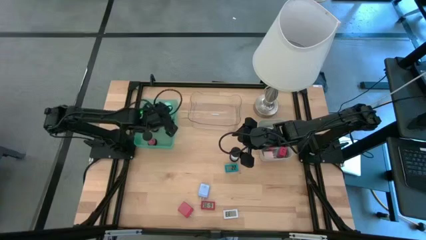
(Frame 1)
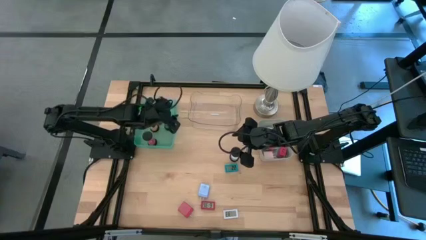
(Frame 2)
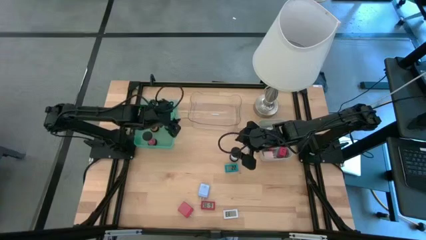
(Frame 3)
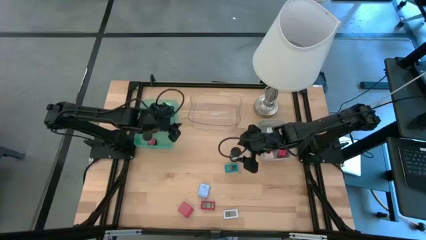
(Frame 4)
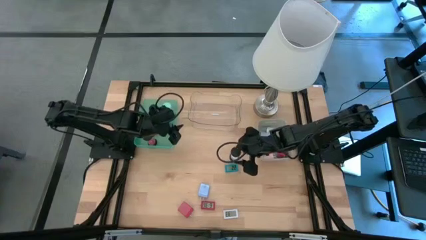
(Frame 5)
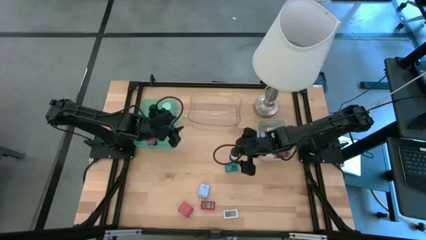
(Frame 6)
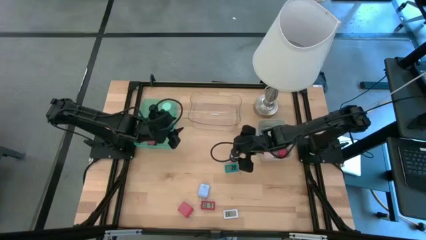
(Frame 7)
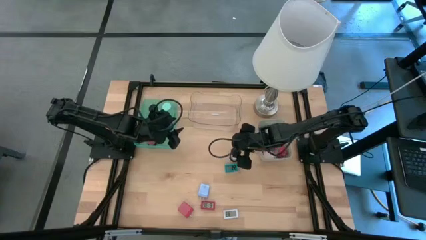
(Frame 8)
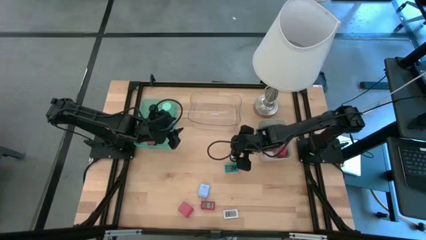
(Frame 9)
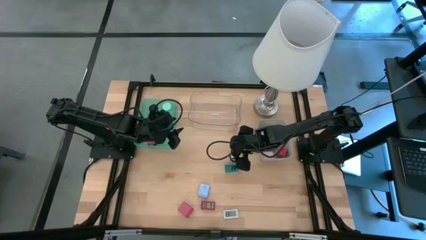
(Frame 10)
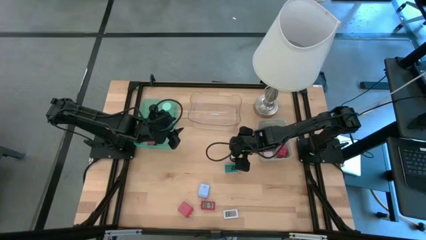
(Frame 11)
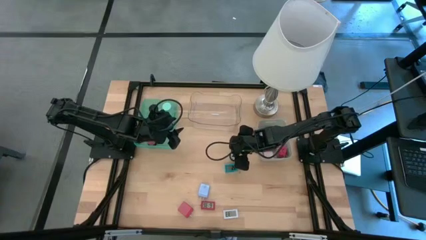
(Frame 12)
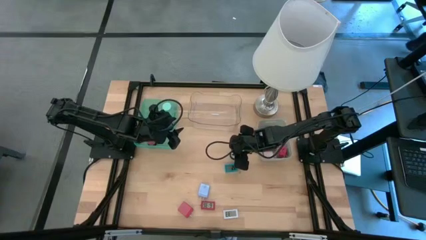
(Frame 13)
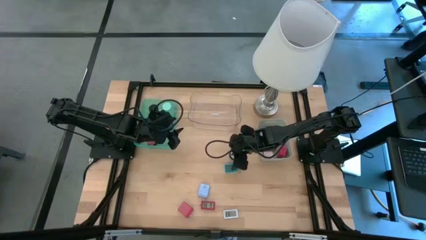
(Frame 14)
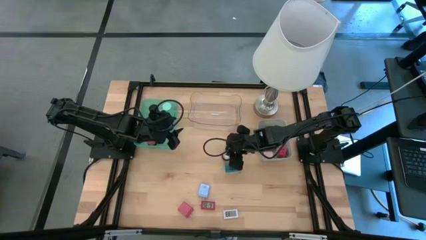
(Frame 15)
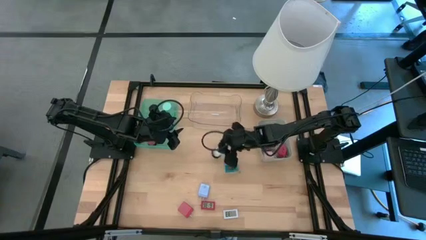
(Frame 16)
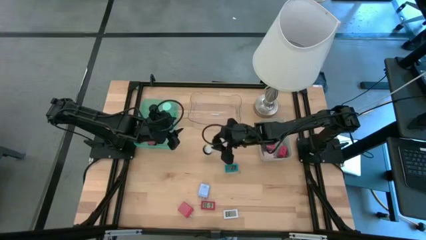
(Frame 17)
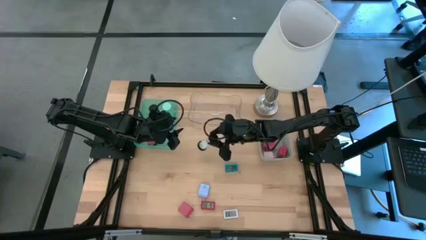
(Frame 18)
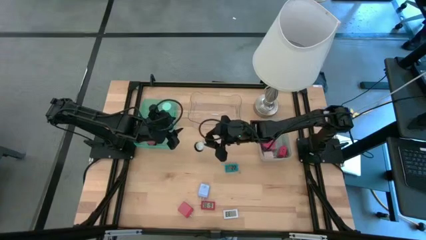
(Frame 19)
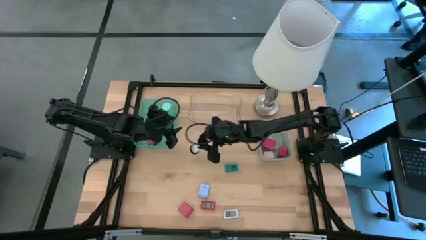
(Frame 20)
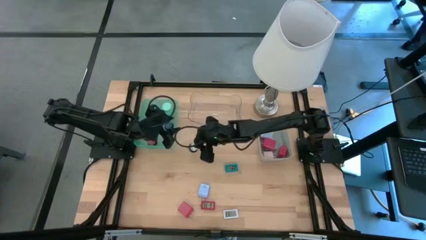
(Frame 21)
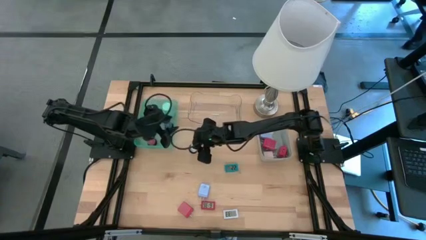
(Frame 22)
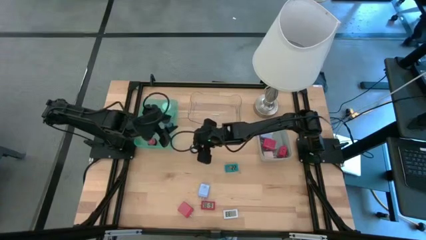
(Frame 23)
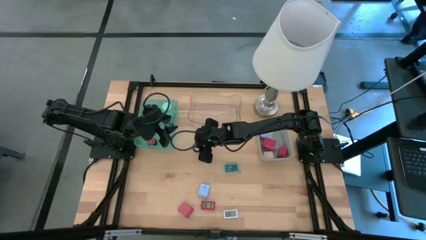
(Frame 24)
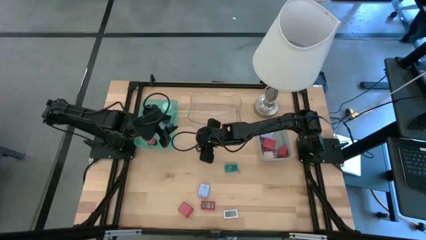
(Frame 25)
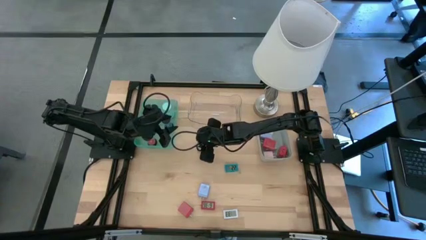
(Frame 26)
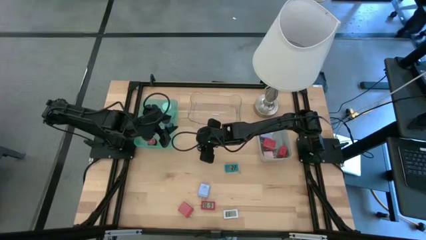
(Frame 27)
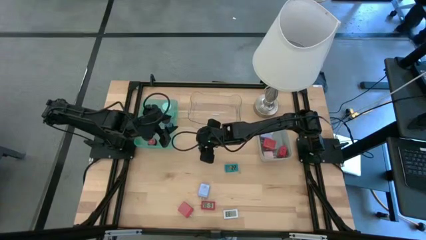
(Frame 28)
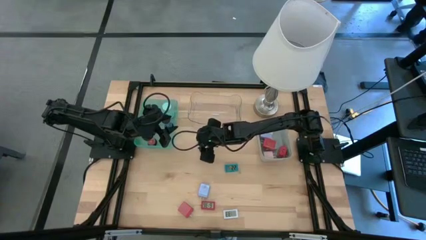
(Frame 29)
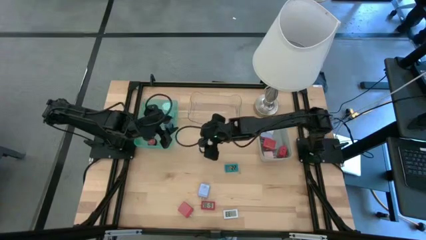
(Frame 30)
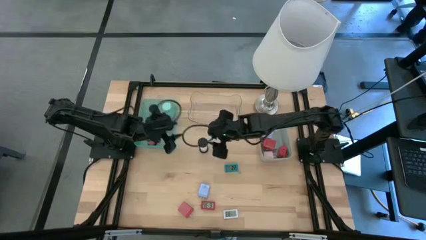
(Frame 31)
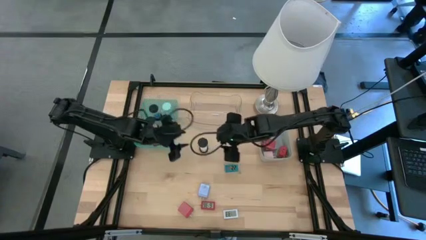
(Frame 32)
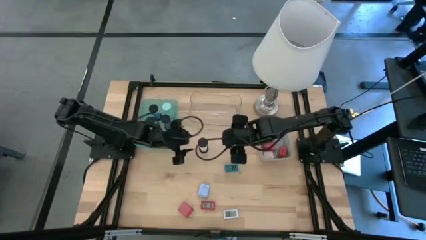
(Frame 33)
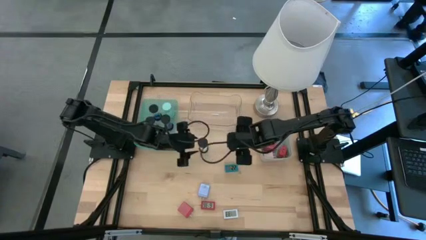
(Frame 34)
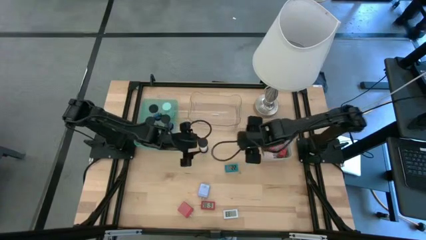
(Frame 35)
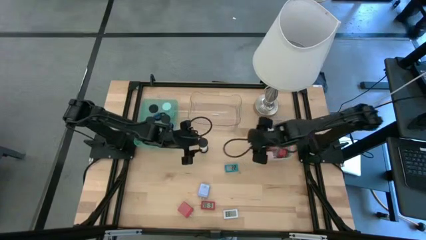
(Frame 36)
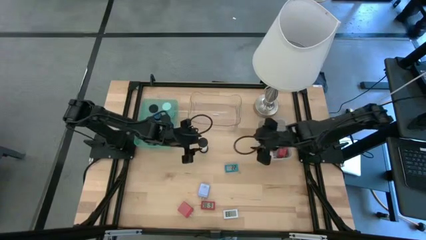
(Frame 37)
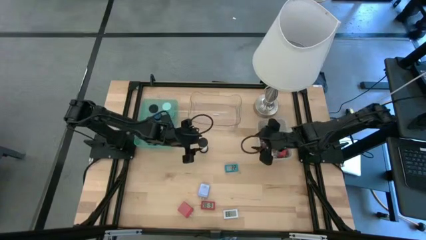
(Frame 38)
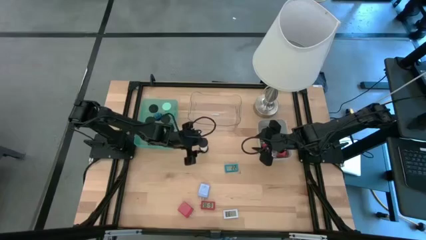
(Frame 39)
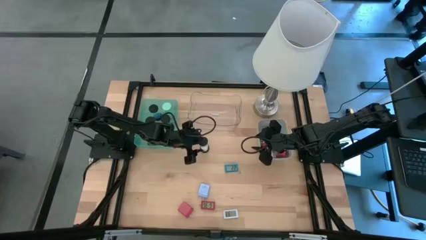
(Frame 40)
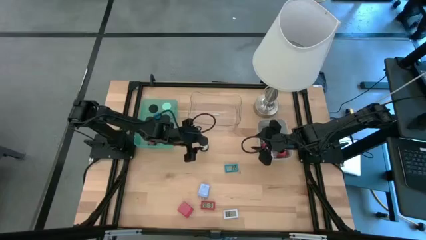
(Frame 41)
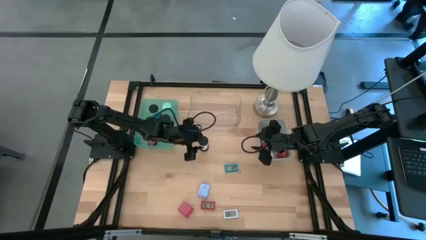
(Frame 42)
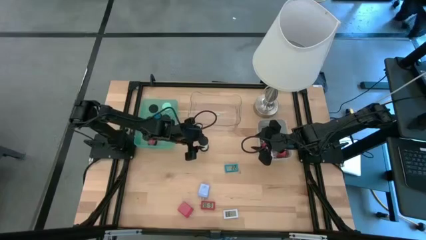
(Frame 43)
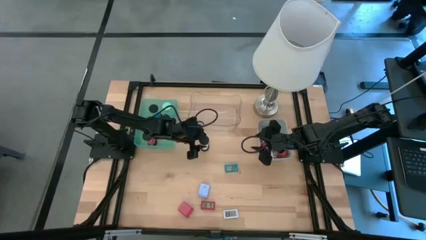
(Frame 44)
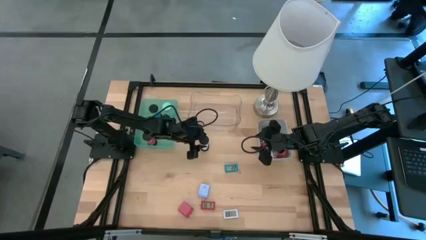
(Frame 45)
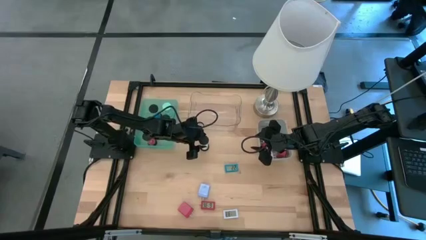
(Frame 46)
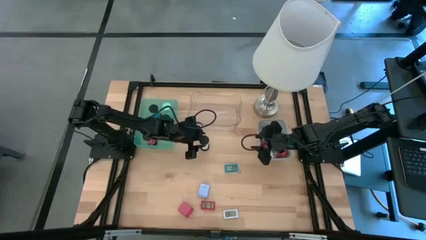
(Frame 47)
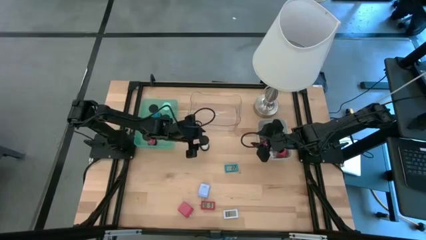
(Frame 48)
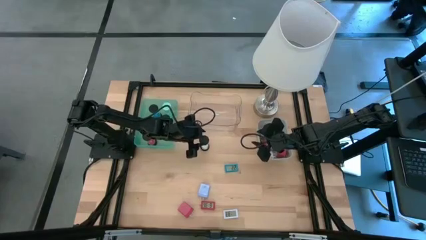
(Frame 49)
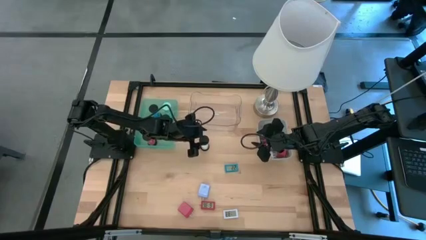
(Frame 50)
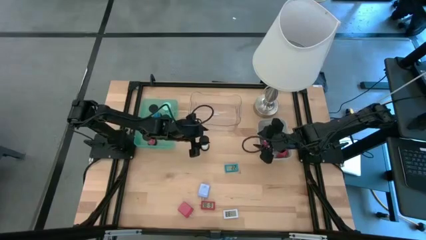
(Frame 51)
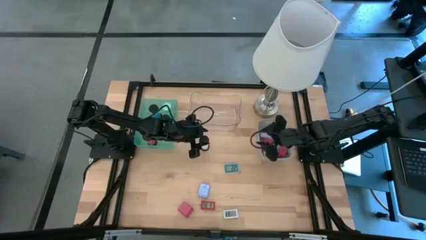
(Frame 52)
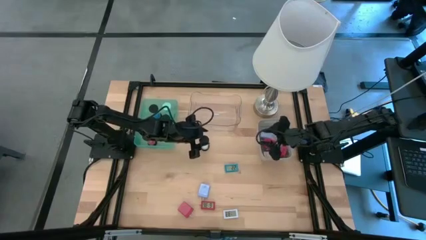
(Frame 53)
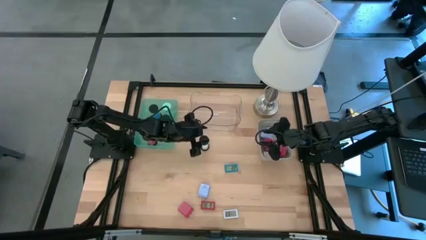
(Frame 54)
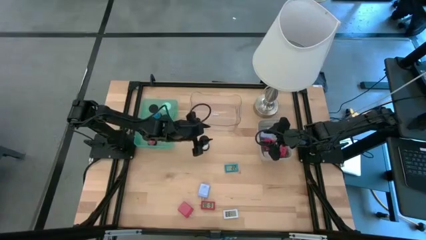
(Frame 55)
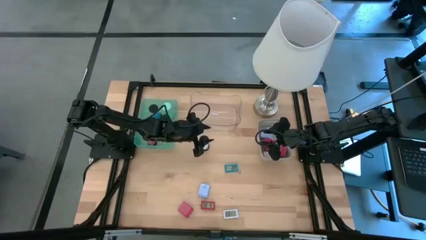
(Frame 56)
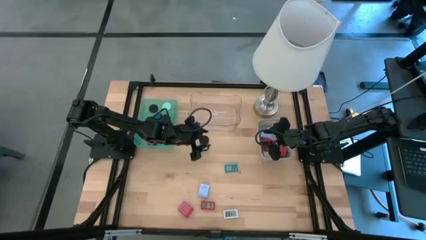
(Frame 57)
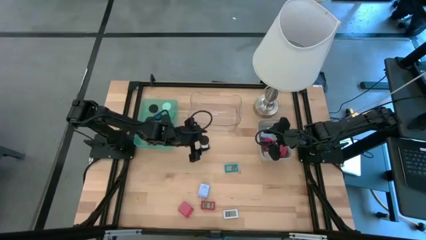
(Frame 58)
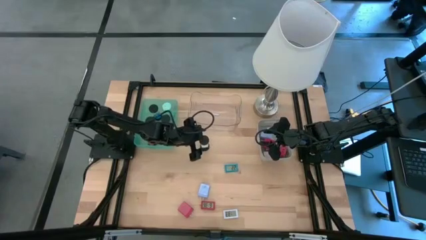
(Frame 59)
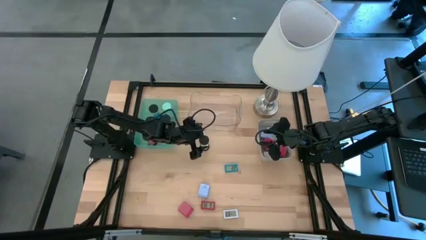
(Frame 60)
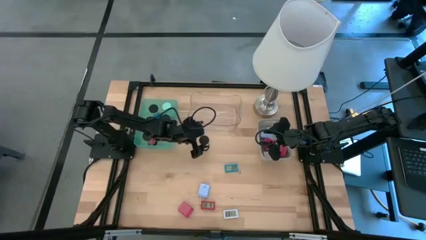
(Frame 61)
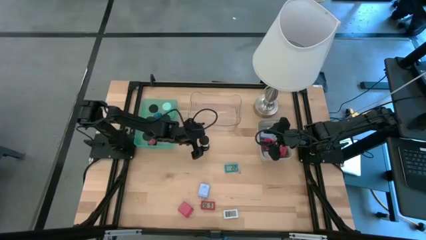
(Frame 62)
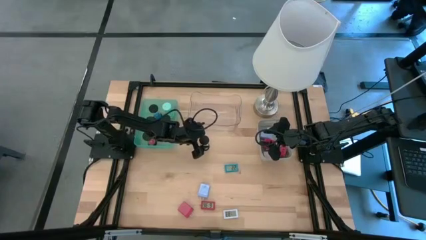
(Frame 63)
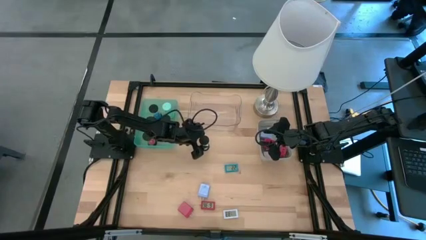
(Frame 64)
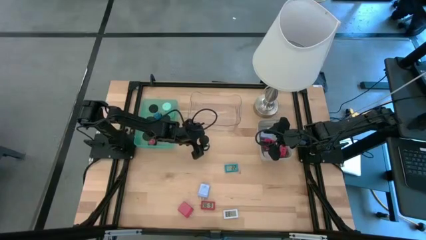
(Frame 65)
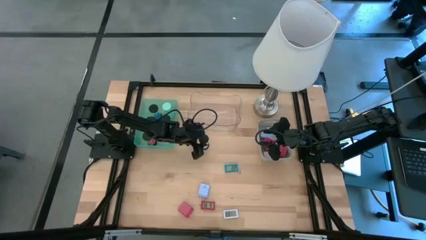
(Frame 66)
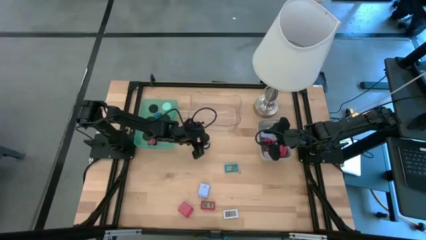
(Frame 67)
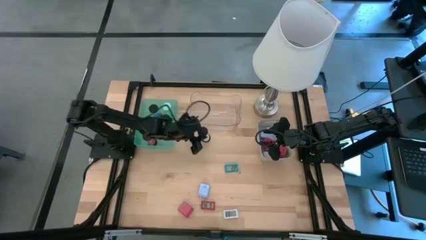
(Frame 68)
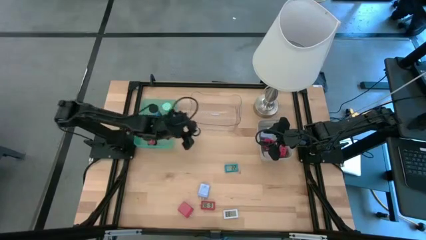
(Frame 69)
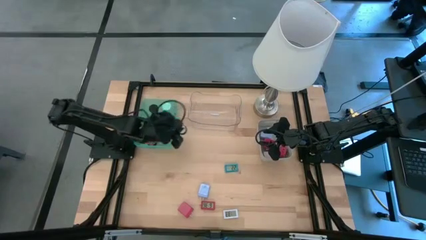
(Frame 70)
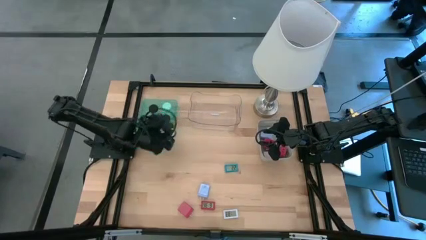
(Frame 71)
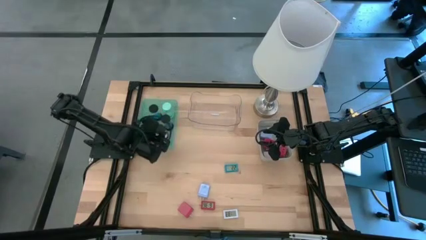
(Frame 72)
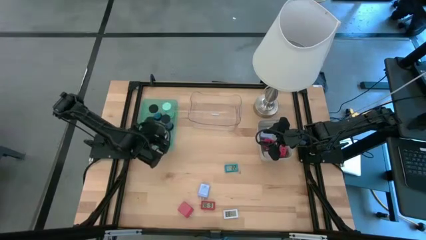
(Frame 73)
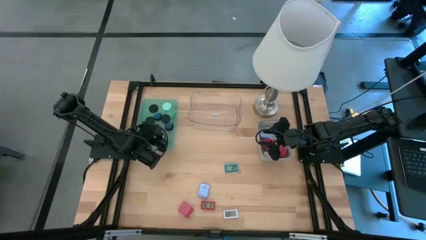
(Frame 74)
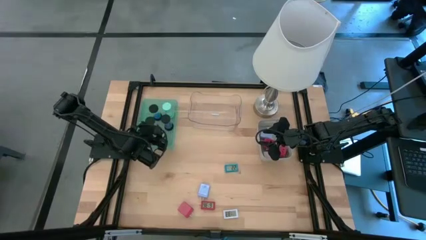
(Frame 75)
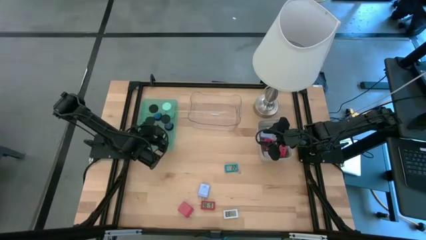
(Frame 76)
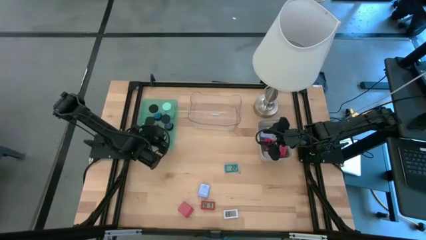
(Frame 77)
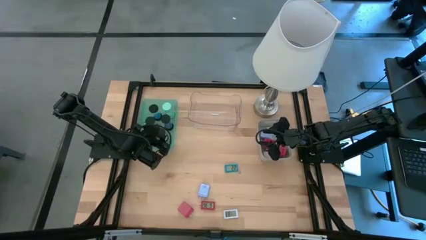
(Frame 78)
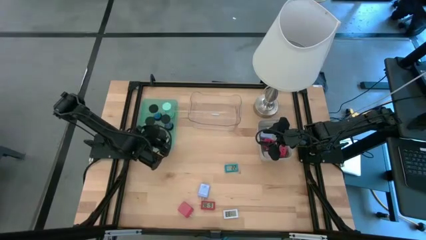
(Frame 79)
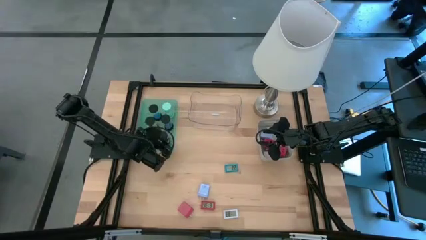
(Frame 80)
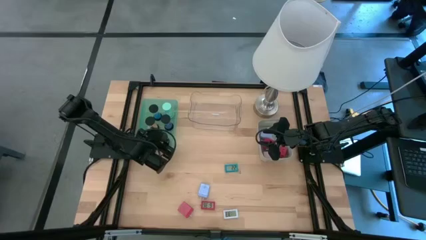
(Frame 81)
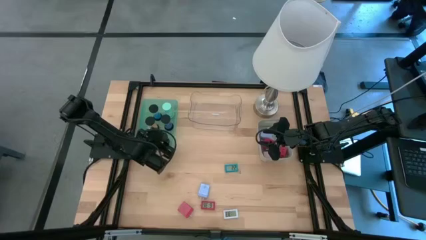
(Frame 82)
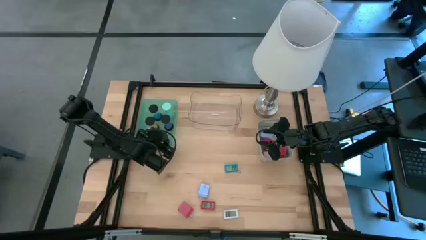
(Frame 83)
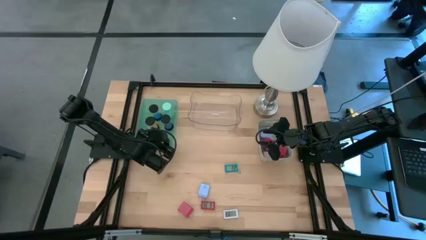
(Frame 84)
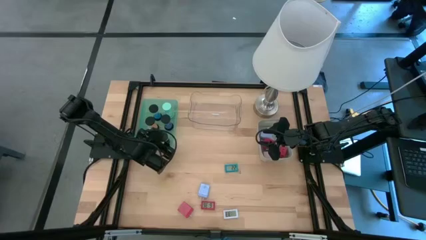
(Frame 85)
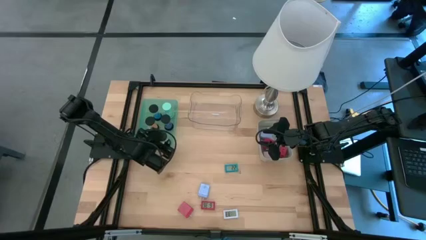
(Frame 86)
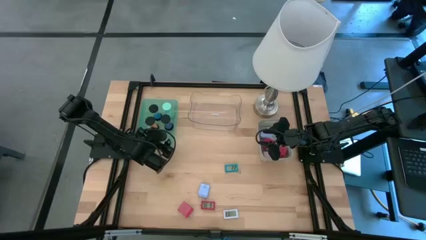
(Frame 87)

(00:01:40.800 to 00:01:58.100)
Task: Pick & Place Office items
Put the black and white hourglass into the green bin
